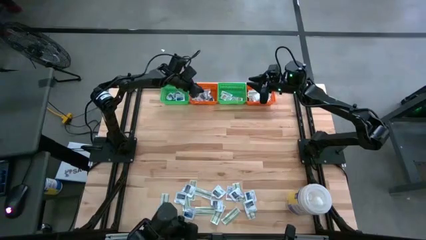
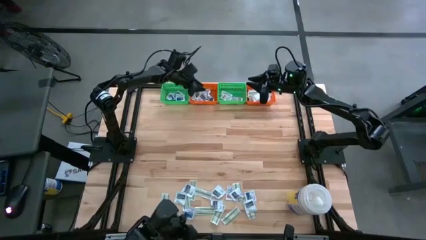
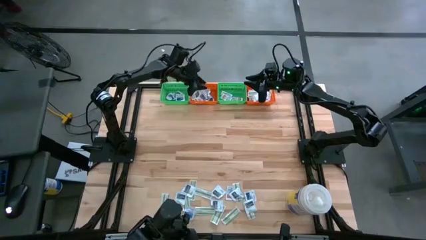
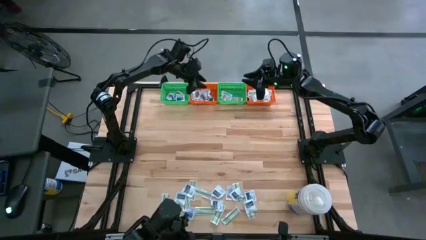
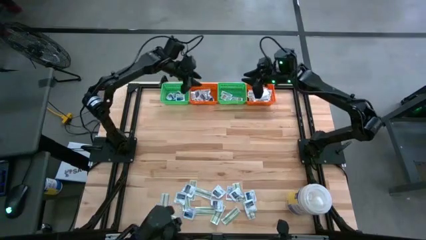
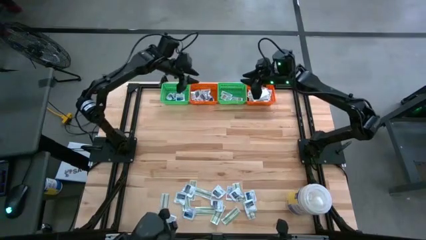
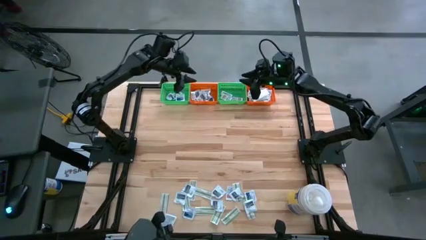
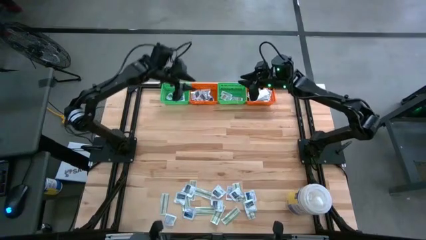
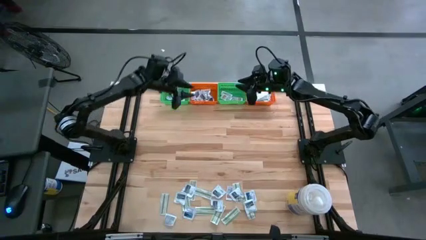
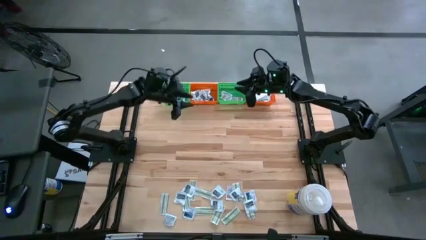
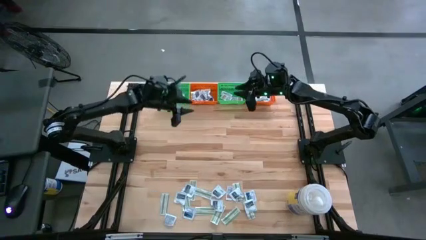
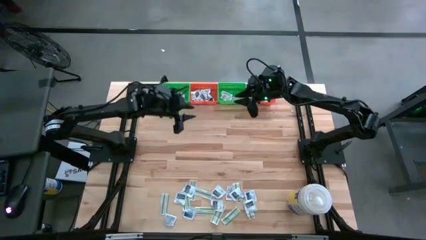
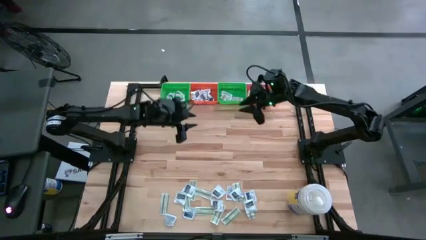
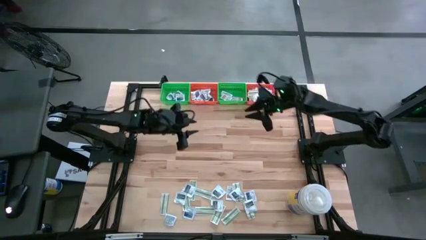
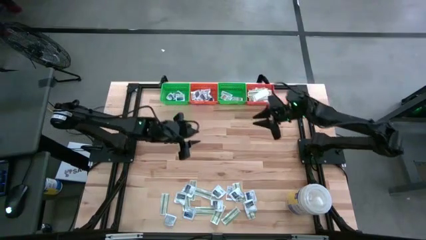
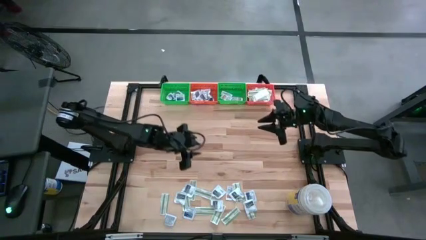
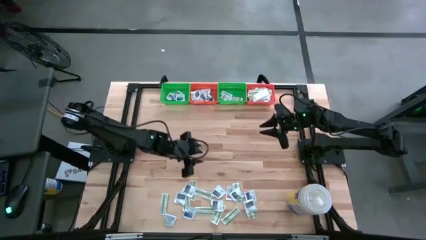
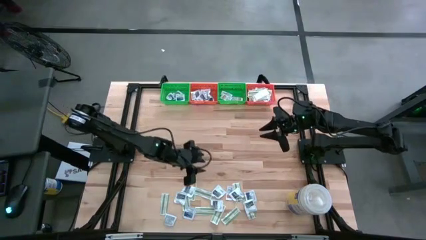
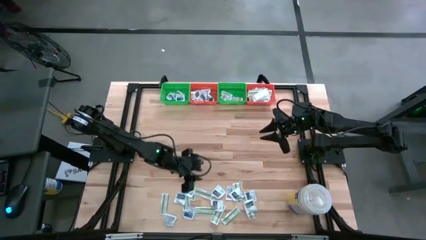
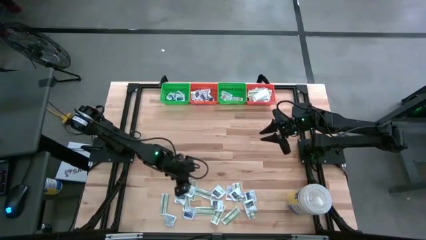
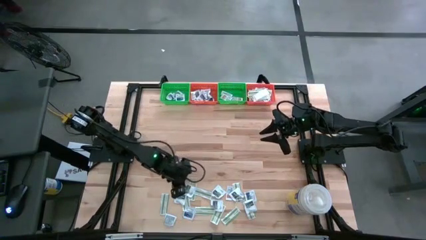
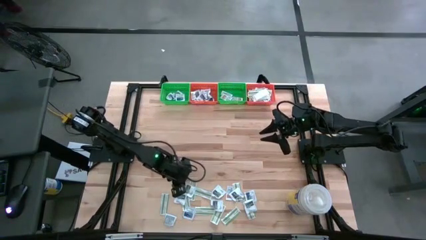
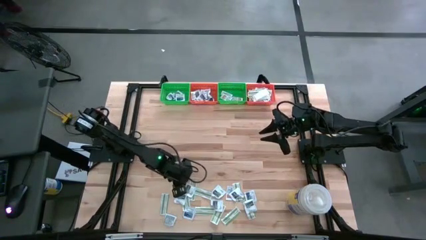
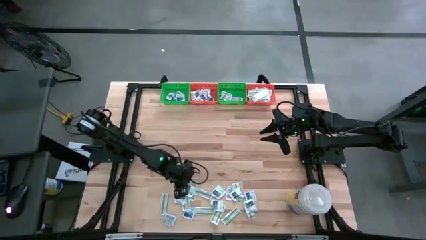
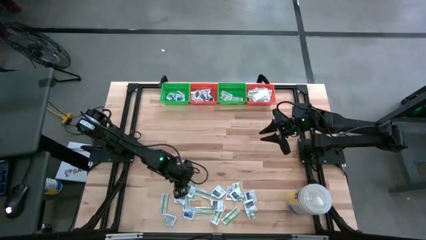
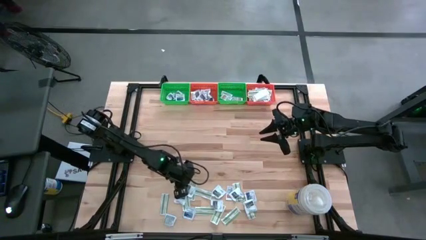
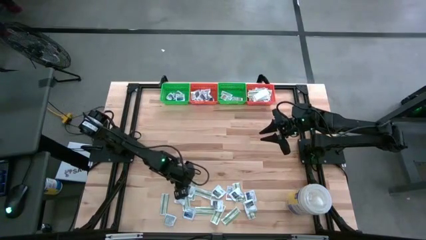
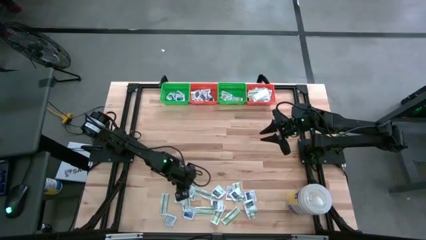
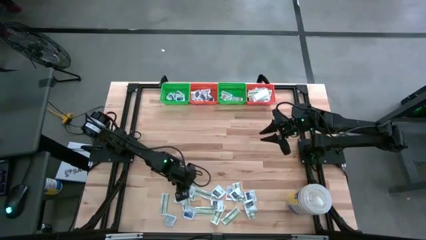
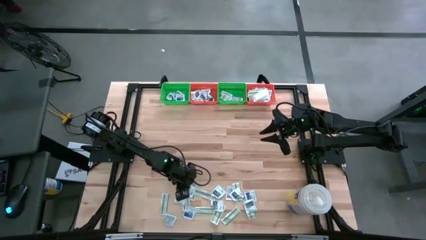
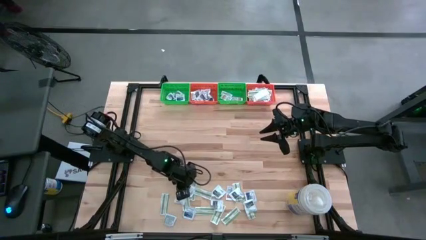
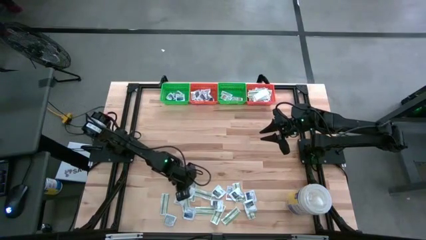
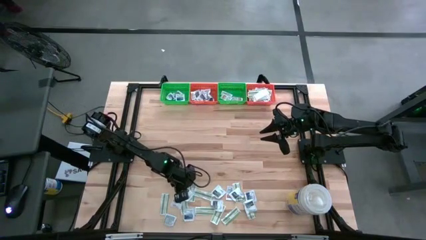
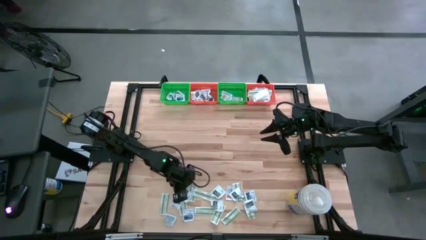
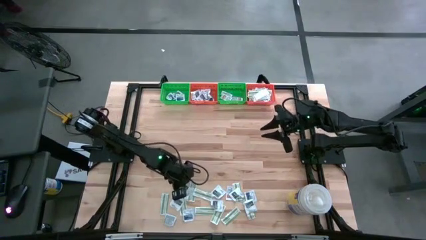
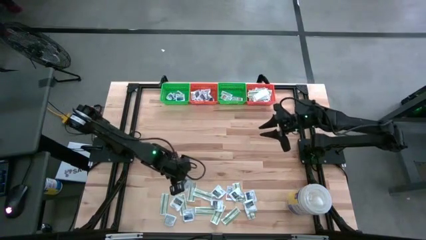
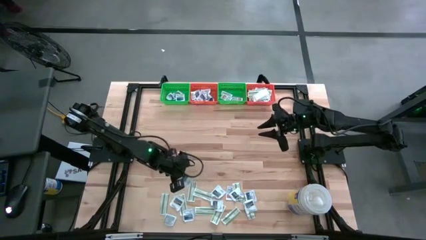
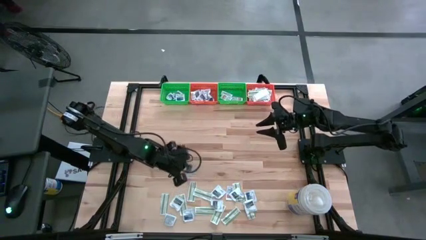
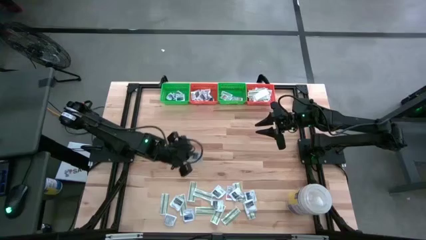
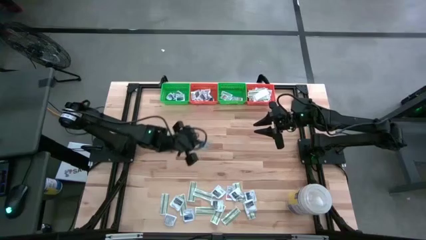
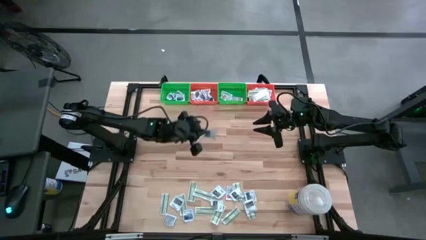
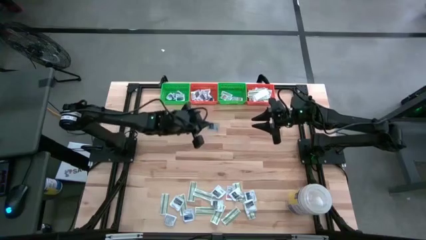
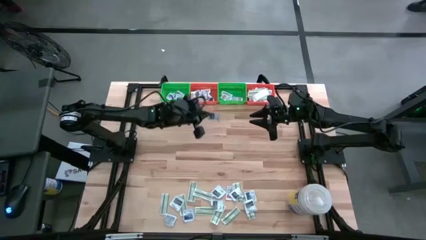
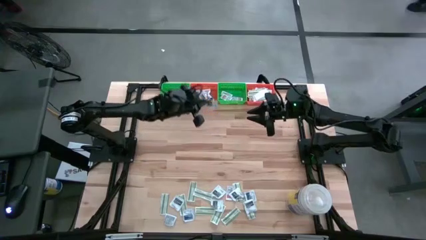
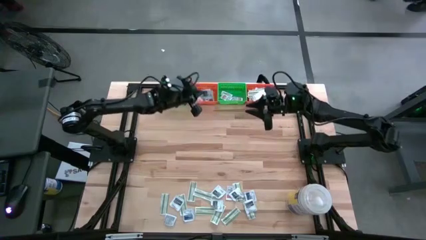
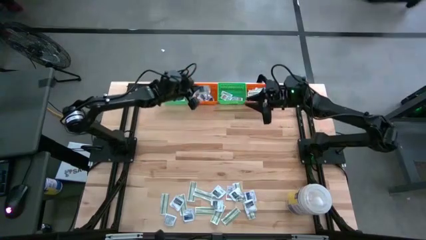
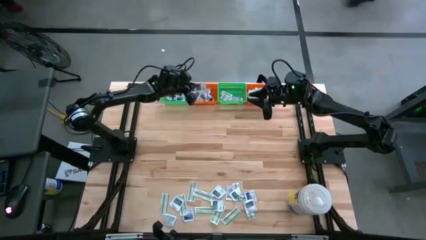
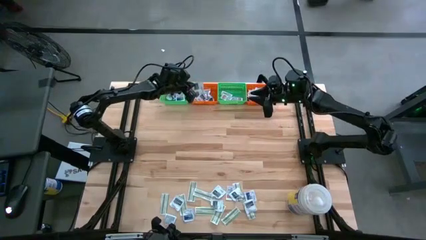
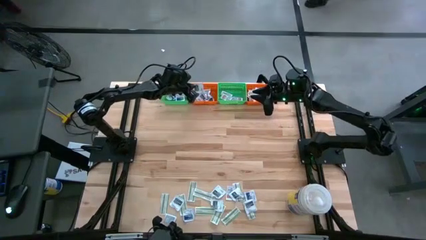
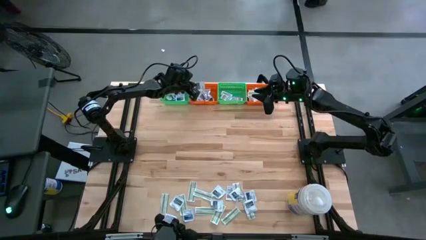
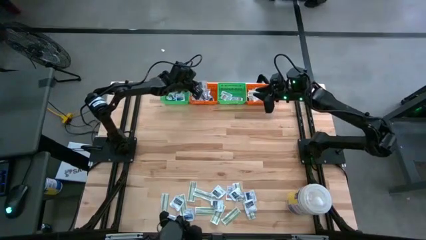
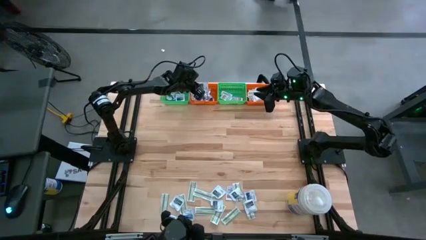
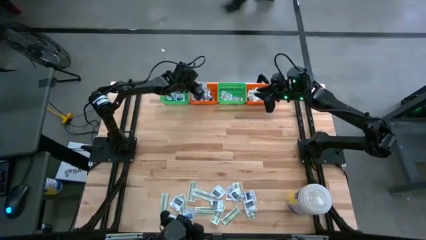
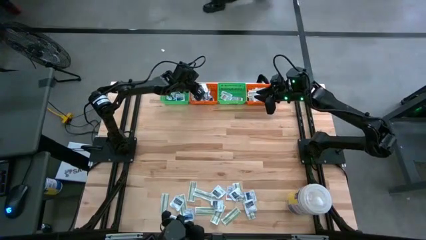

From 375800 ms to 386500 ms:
Task: Pick & Place First Aid Supplies
Put the gray towelette pack in the left orange bin

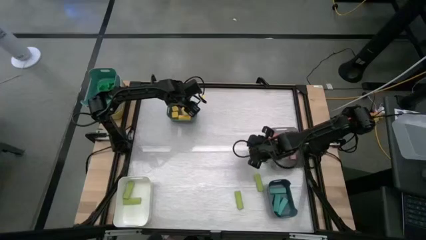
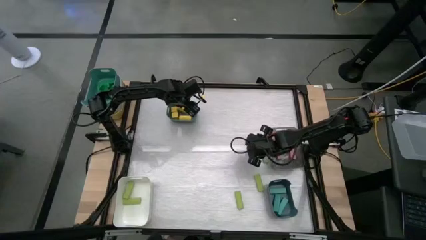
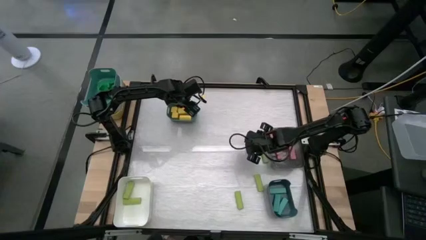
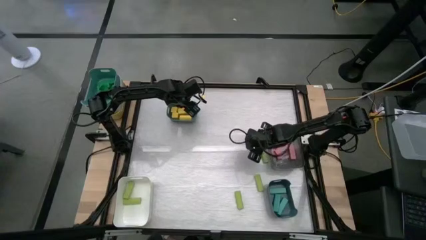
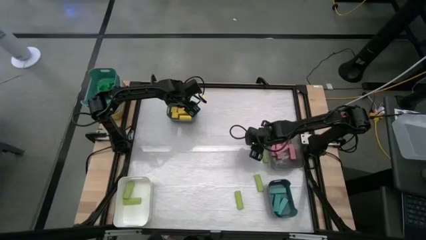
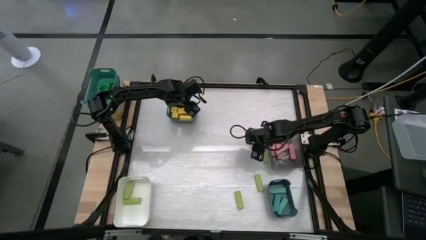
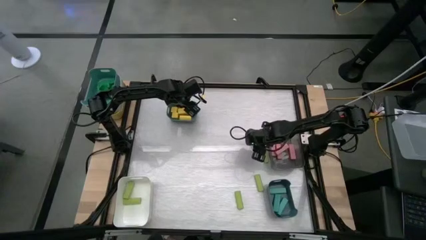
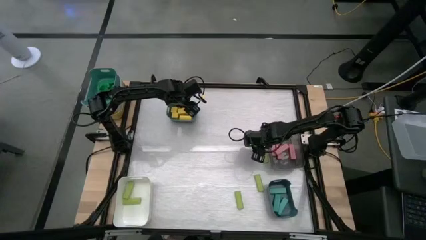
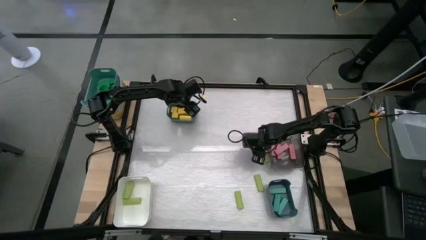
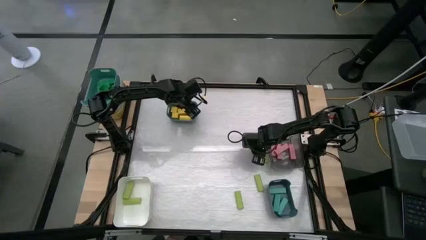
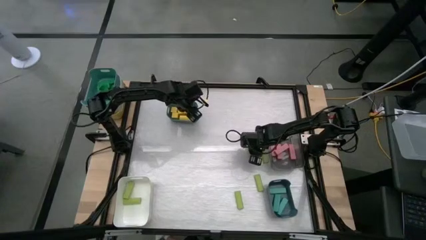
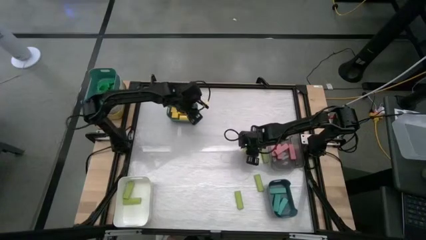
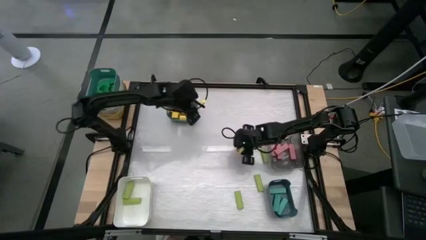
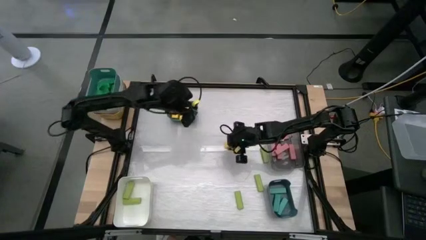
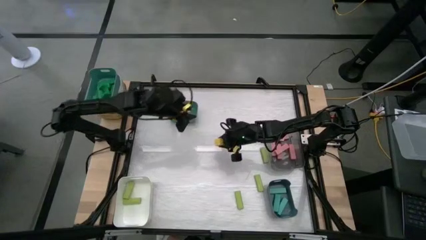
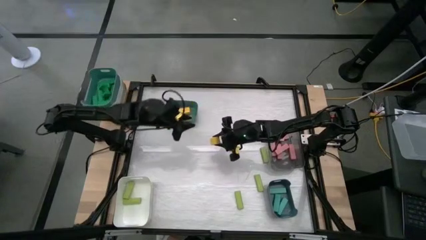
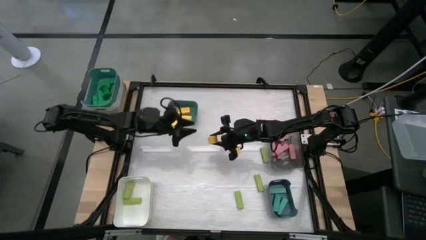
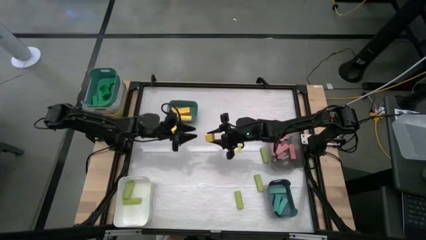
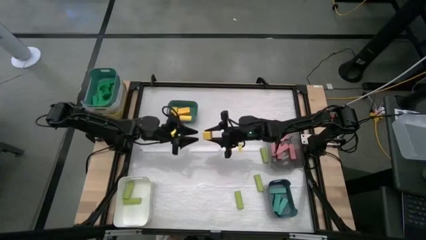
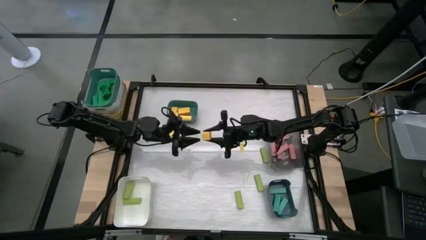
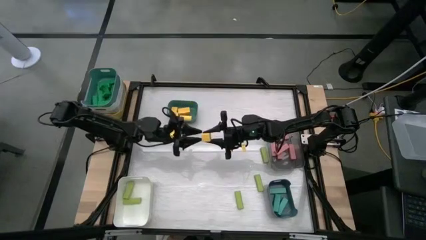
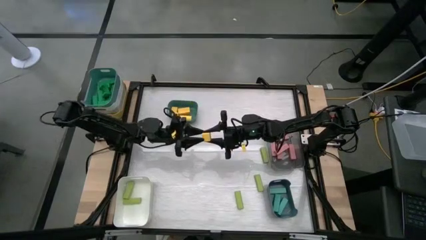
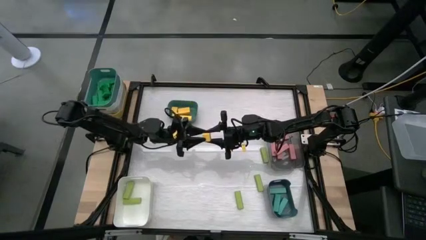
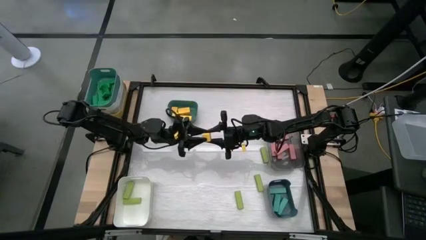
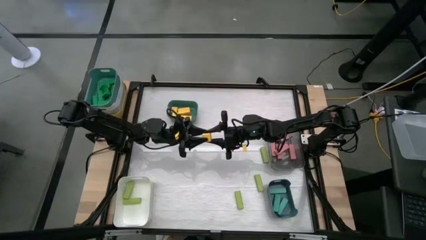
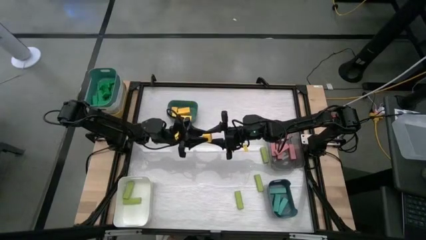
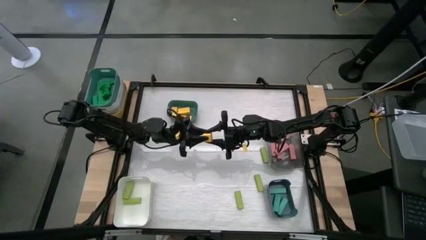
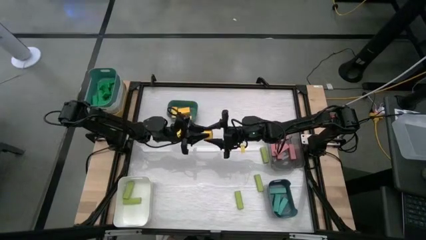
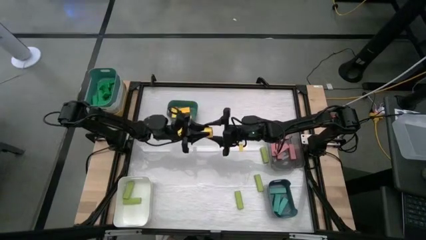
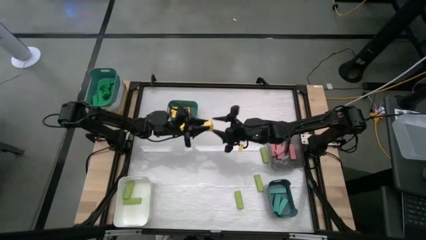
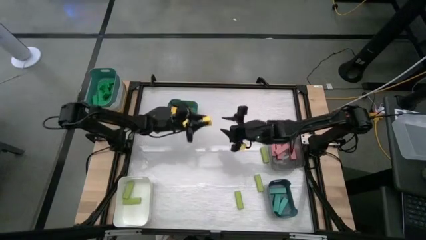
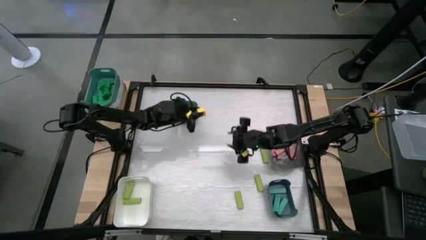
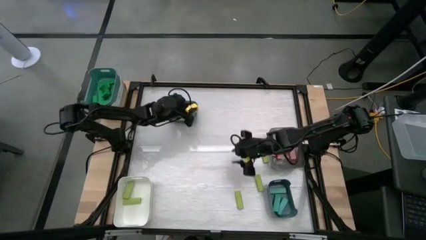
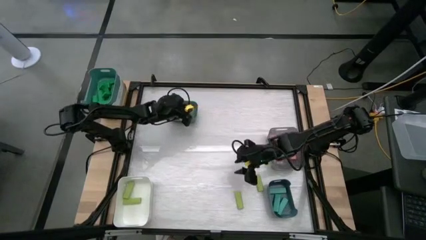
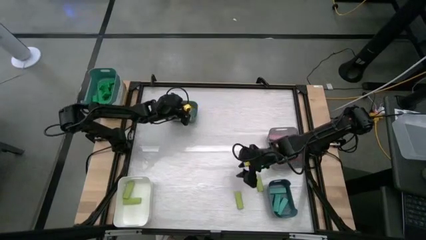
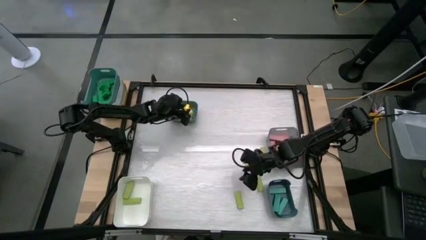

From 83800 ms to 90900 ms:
Task: Sort blocks
Put the yellow block into the green bin
